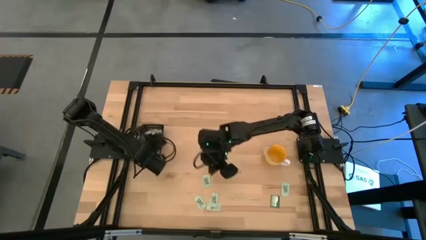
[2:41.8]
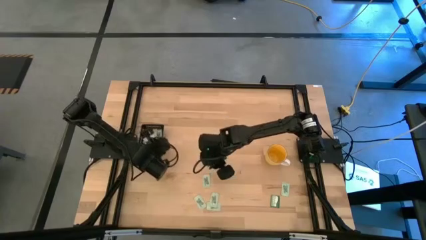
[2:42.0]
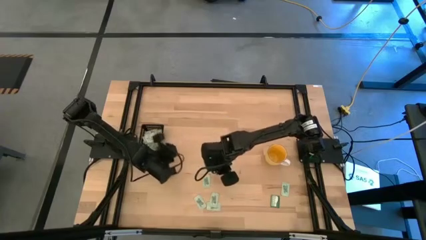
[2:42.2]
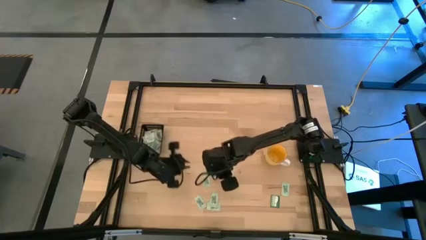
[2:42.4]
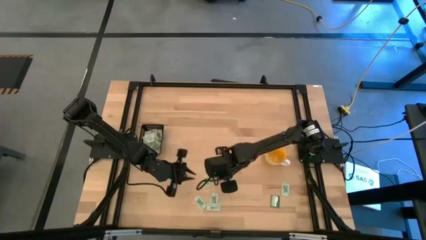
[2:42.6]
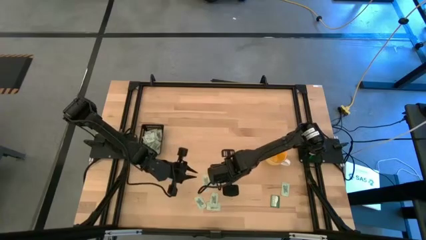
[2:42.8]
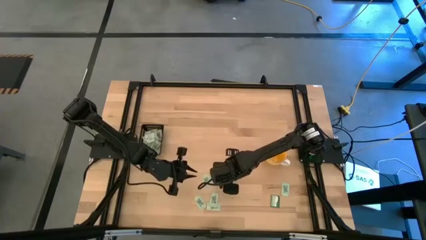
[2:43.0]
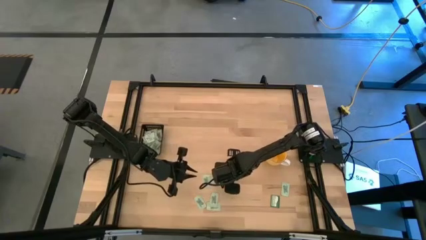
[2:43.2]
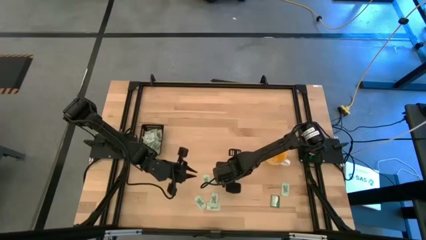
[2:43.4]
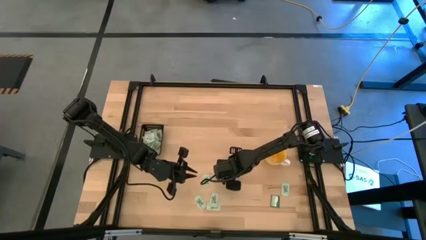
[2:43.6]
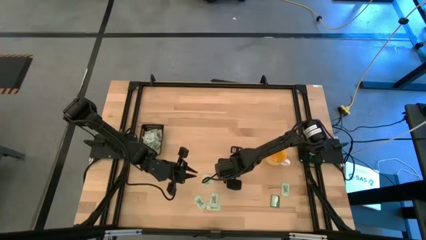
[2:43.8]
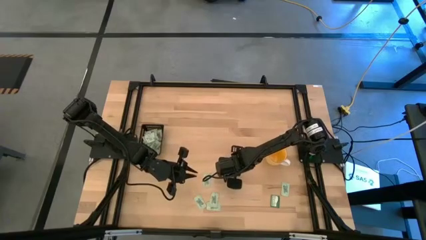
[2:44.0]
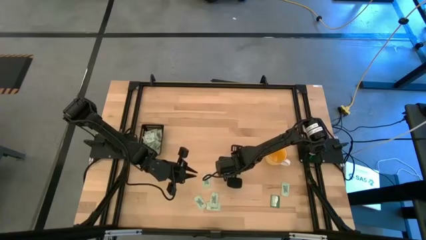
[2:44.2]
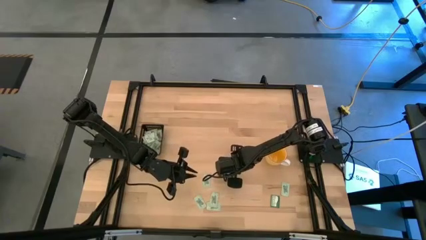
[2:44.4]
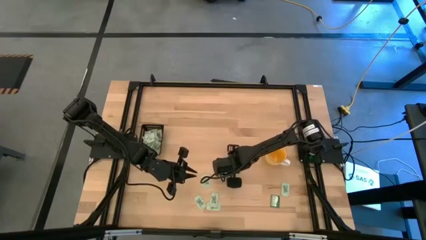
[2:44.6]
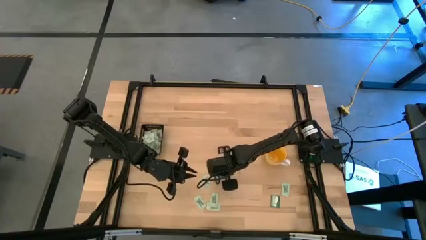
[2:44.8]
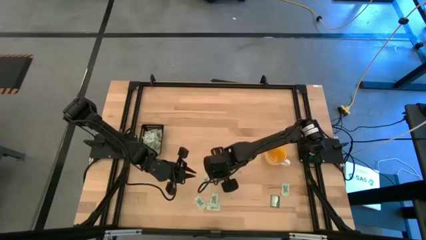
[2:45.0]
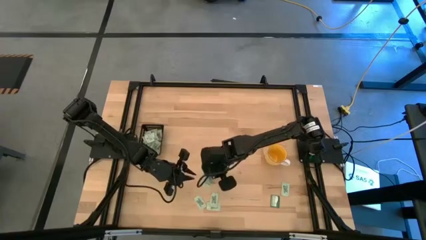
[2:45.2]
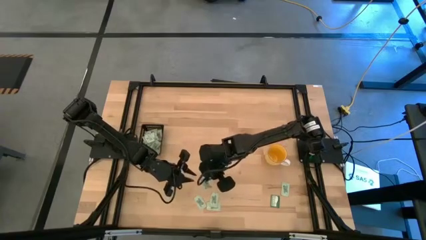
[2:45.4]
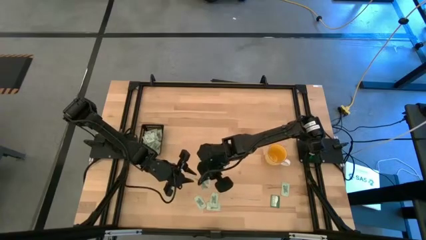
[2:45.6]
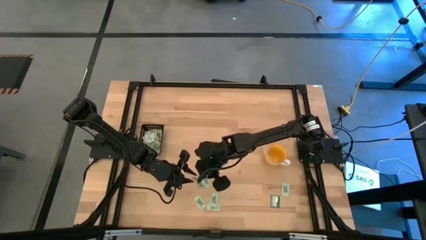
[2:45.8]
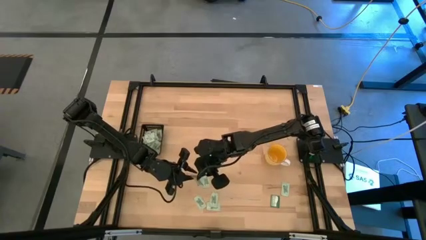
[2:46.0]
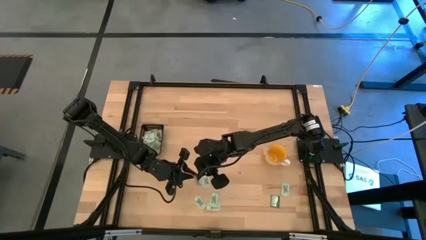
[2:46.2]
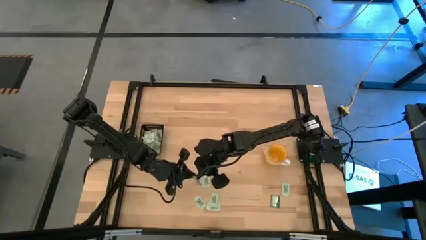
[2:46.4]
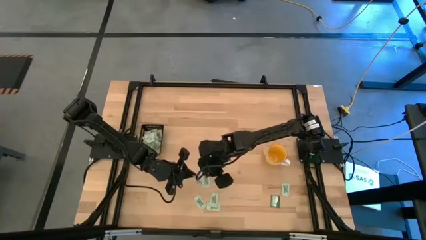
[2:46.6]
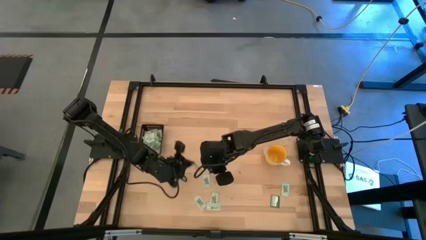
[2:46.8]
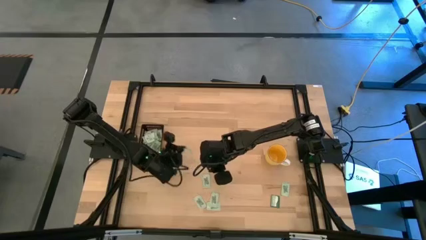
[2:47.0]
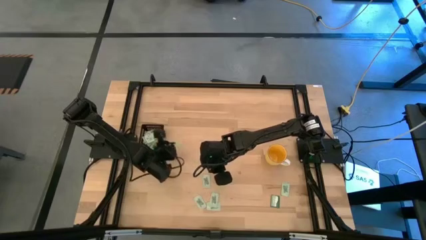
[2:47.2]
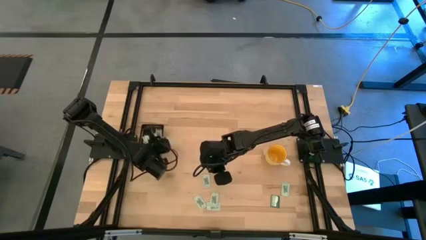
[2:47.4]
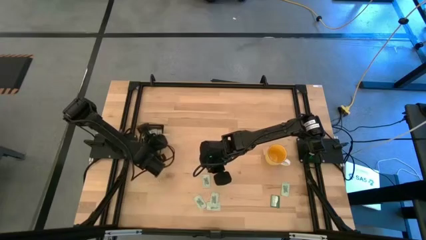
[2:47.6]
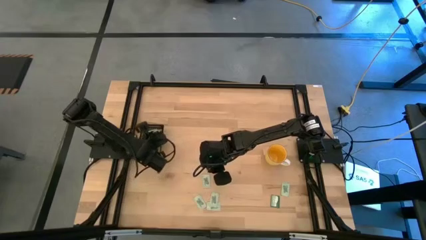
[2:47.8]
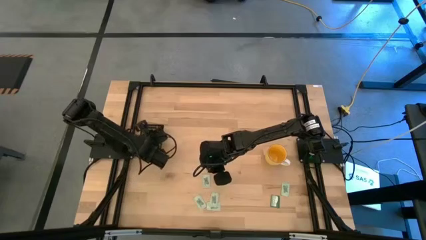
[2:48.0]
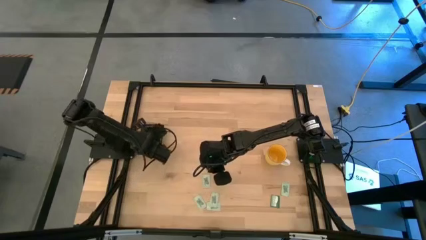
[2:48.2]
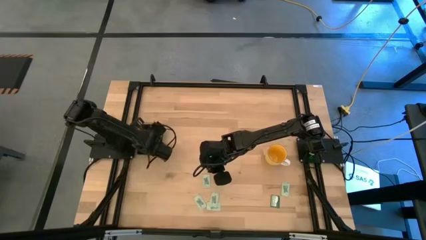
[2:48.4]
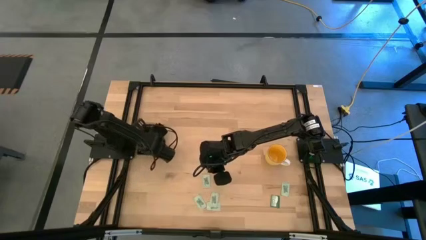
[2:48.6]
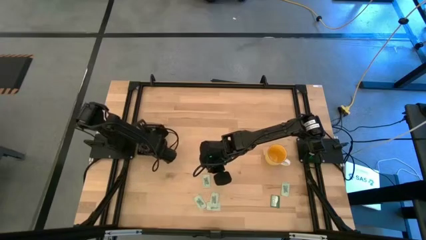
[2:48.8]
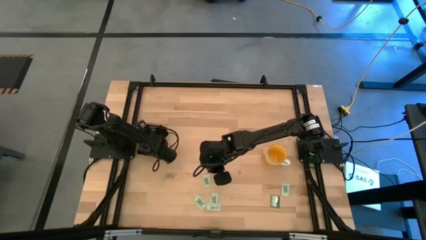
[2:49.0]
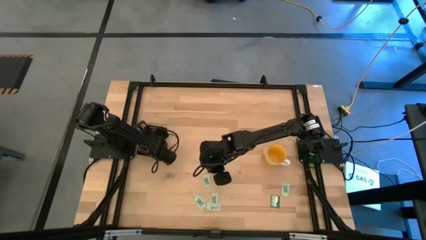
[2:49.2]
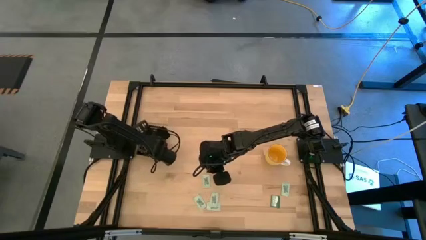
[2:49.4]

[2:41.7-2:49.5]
Task: Pick and place Stevia / Truvia into bins
Put the stevia packet into the black bin

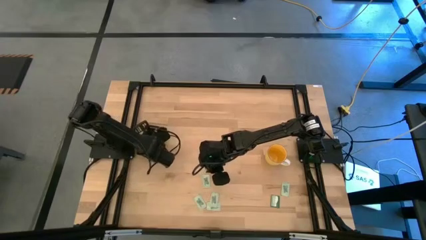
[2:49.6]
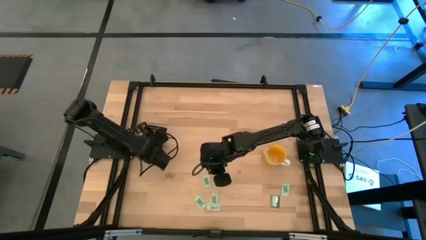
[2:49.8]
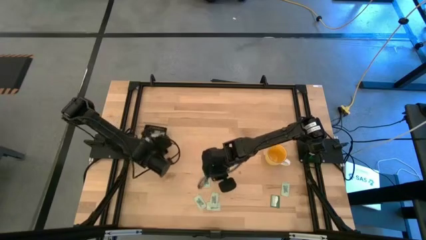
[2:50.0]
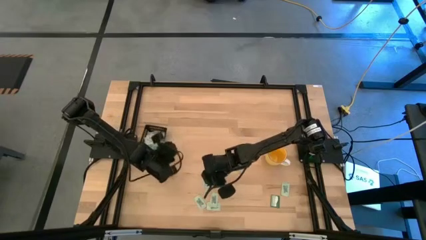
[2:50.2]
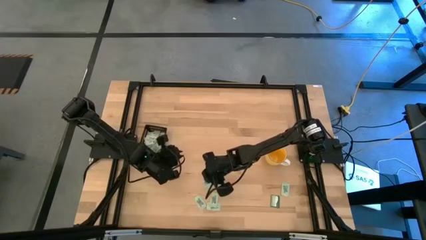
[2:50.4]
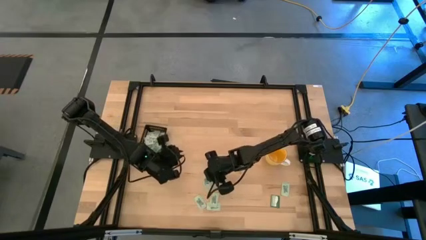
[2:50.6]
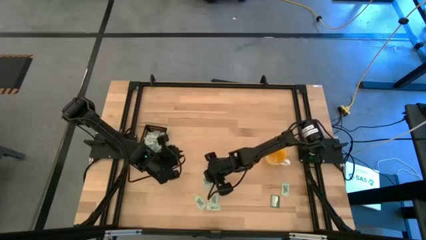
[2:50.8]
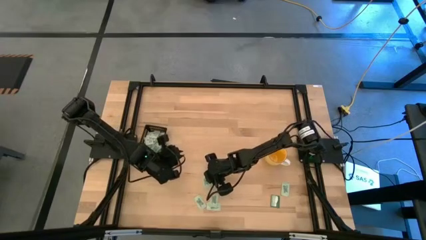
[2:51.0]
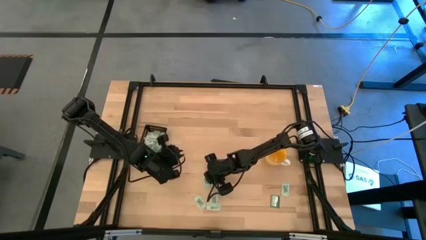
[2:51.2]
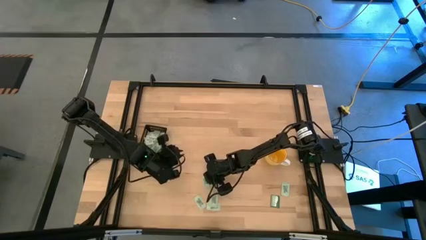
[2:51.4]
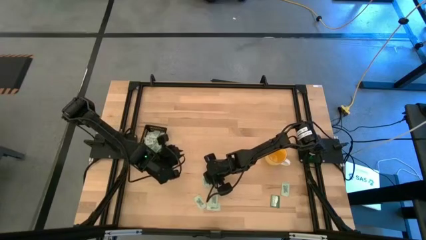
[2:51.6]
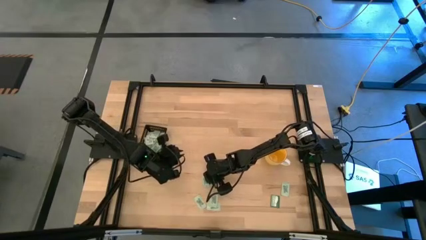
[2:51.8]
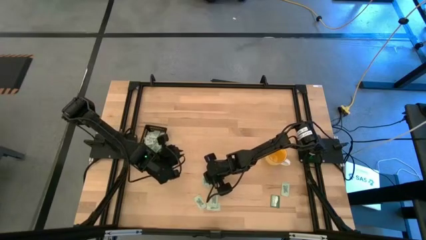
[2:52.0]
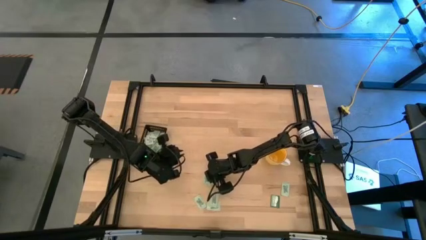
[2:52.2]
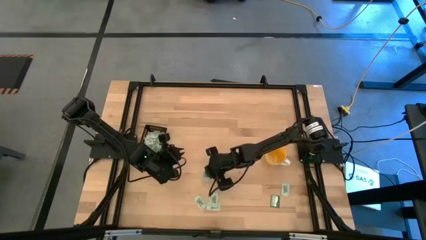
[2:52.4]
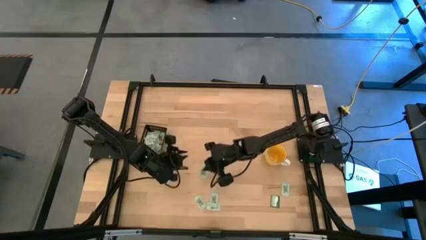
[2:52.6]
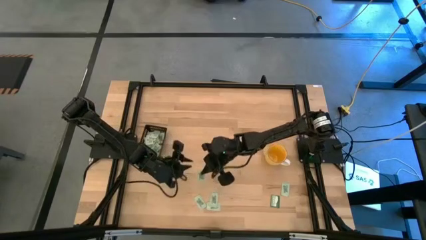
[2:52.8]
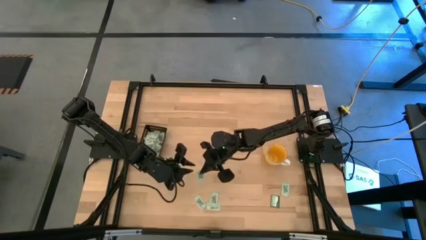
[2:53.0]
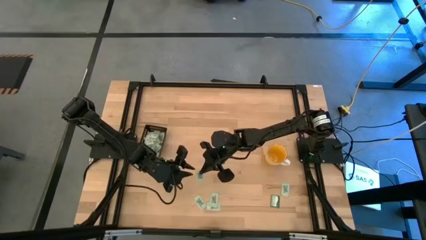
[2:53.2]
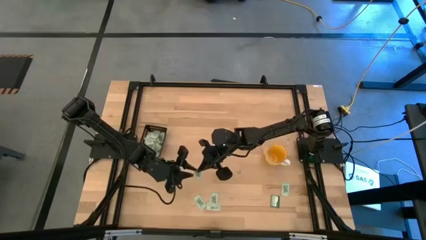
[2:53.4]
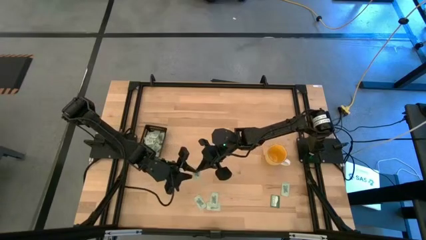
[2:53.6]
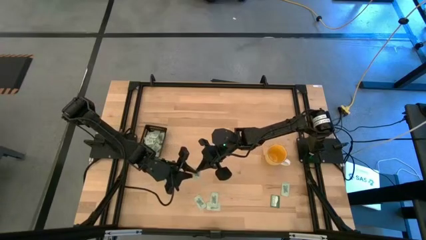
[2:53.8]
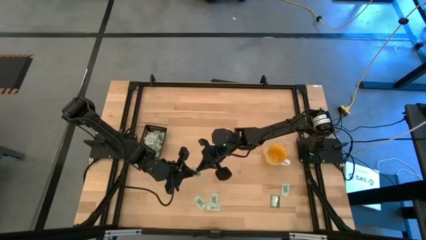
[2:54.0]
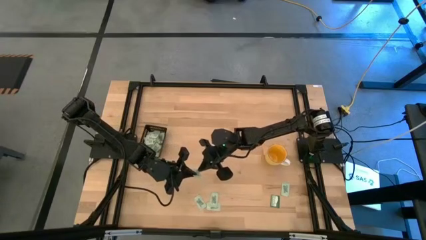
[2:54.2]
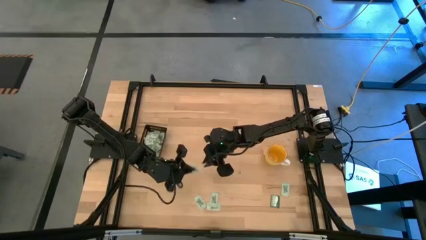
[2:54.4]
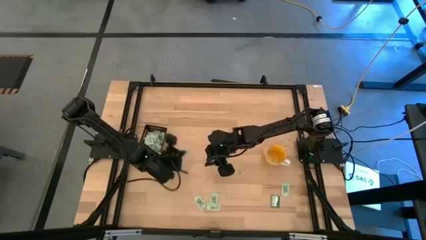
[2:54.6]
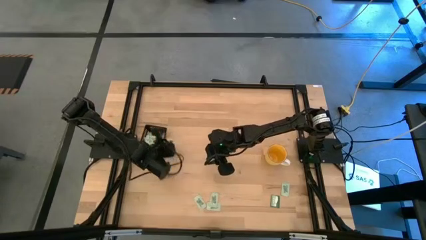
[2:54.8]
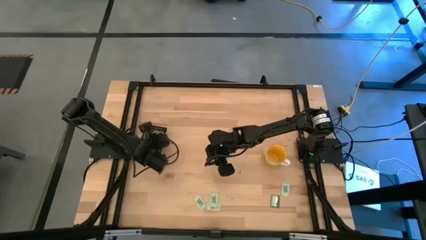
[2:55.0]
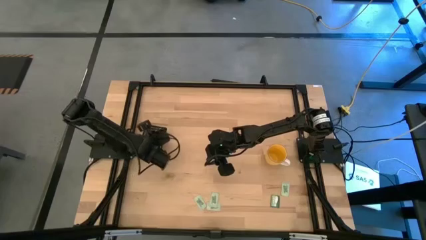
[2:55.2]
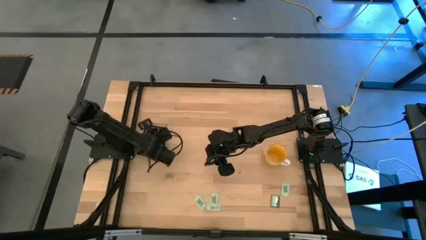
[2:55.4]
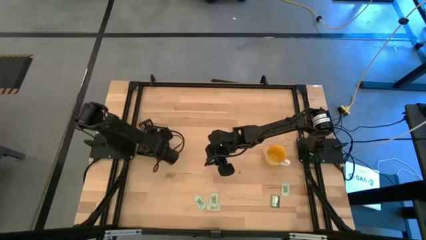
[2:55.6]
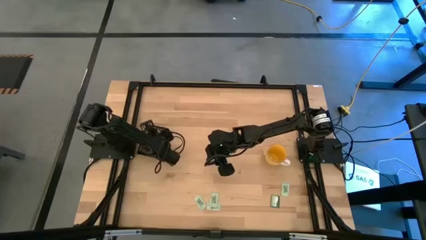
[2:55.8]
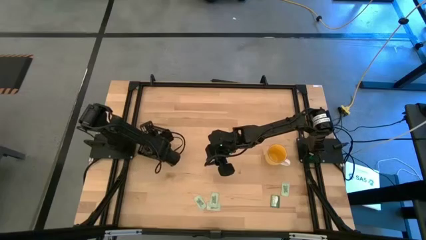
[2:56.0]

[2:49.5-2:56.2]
Put the stevia packet into the black bin
